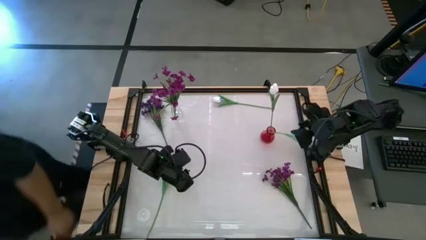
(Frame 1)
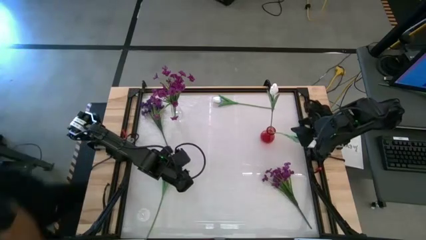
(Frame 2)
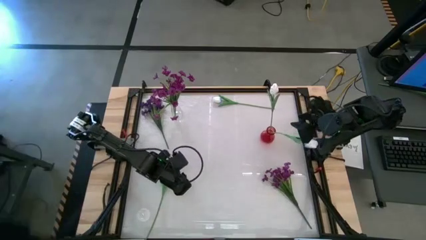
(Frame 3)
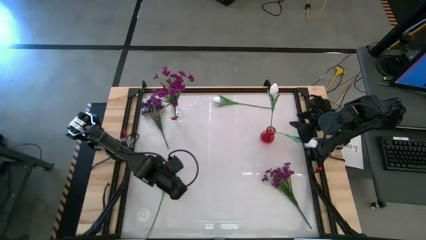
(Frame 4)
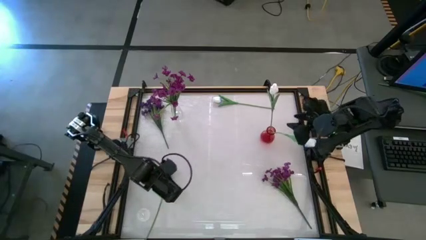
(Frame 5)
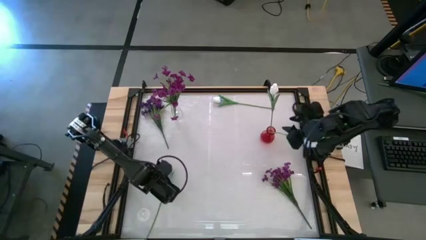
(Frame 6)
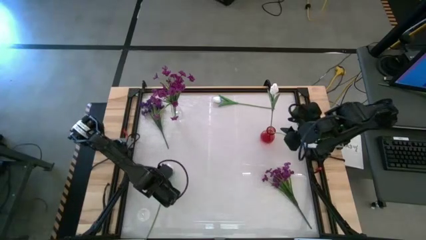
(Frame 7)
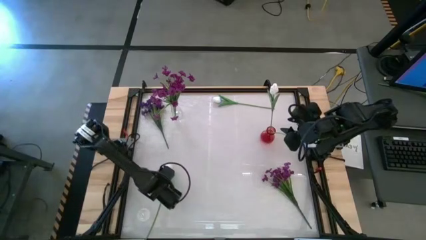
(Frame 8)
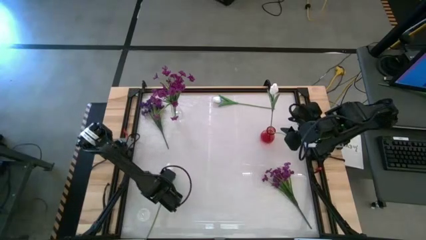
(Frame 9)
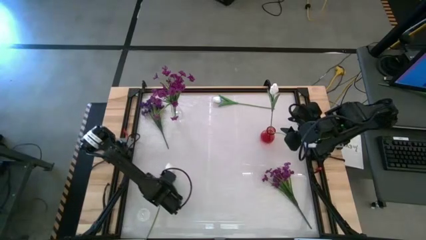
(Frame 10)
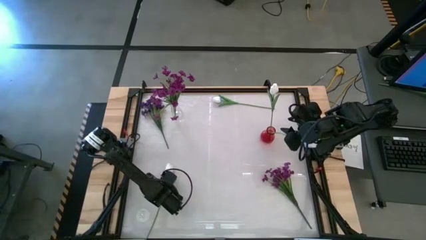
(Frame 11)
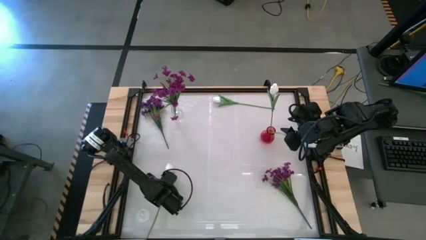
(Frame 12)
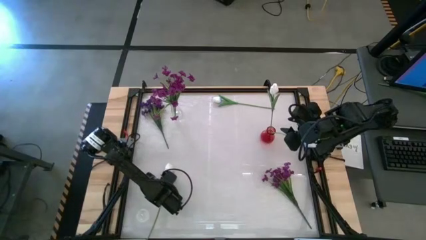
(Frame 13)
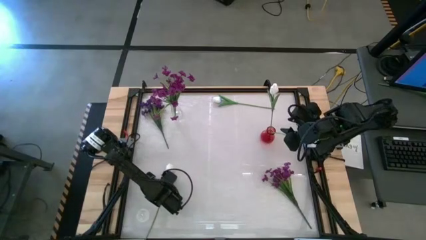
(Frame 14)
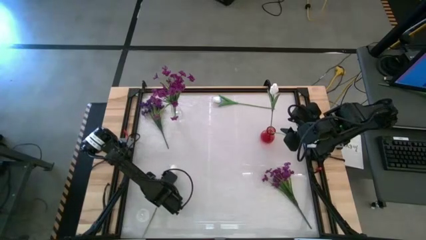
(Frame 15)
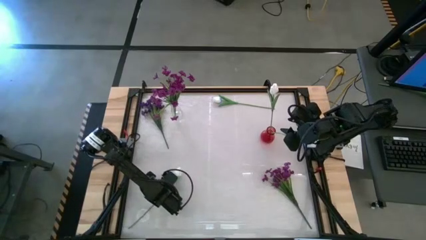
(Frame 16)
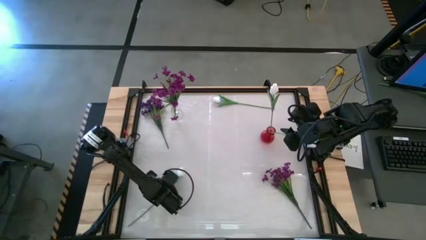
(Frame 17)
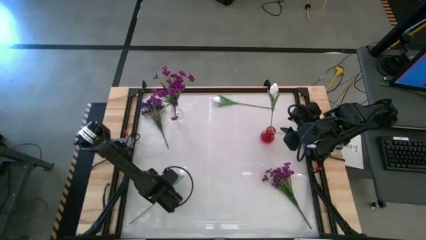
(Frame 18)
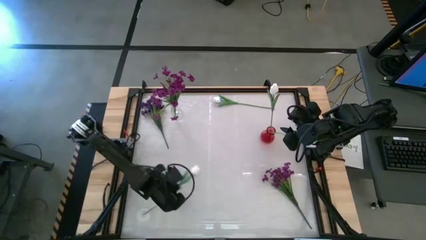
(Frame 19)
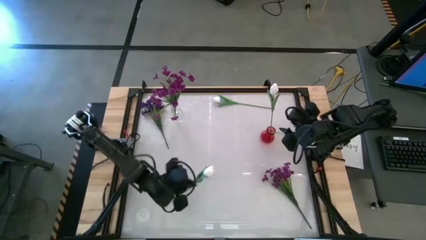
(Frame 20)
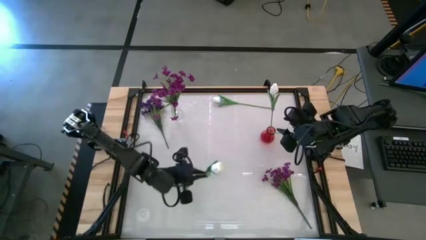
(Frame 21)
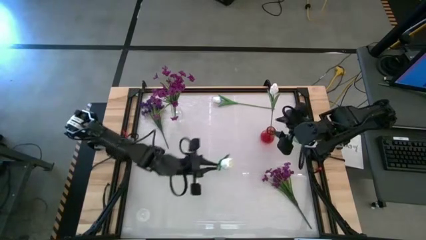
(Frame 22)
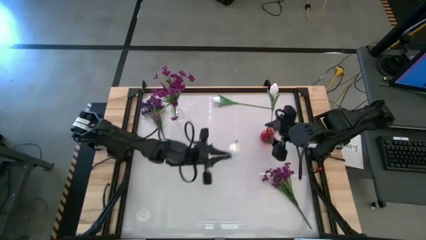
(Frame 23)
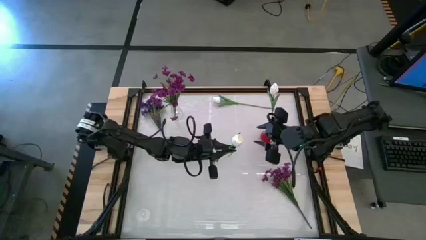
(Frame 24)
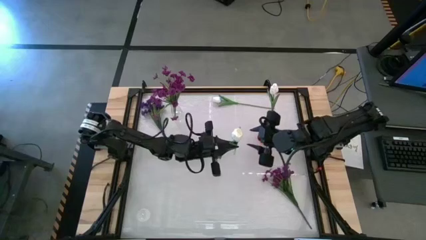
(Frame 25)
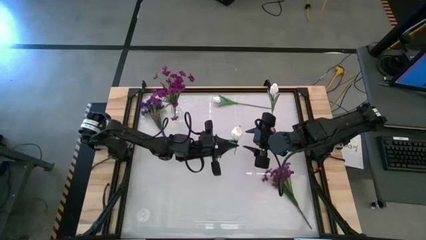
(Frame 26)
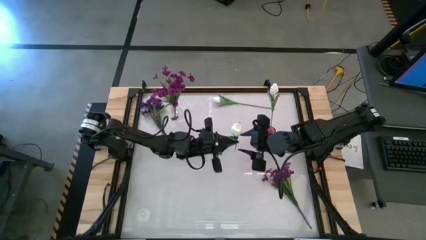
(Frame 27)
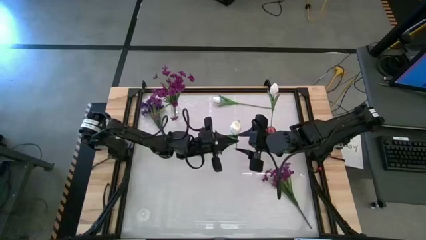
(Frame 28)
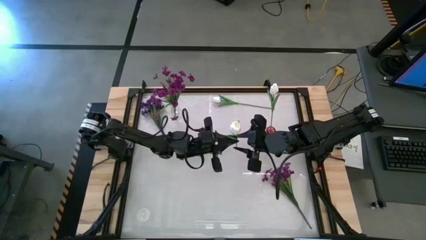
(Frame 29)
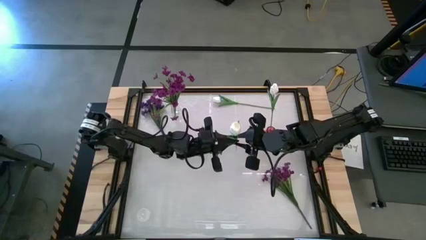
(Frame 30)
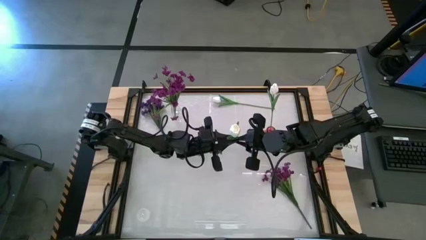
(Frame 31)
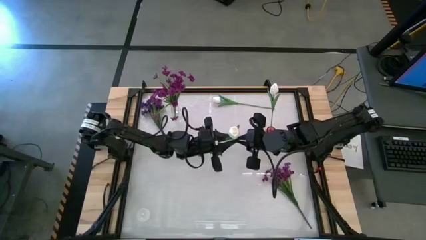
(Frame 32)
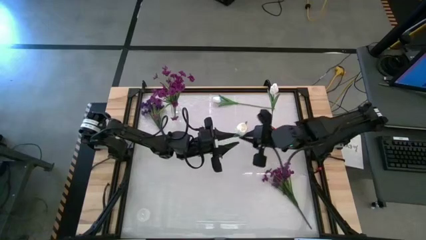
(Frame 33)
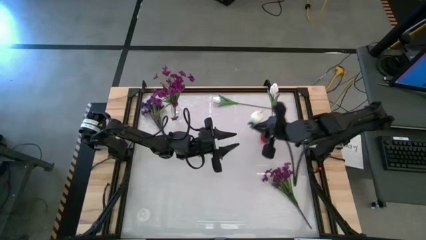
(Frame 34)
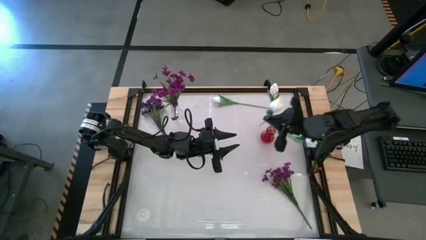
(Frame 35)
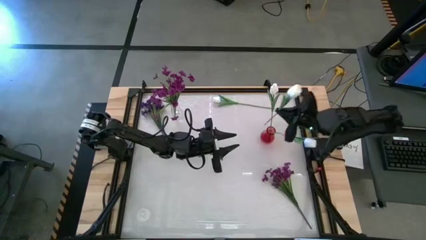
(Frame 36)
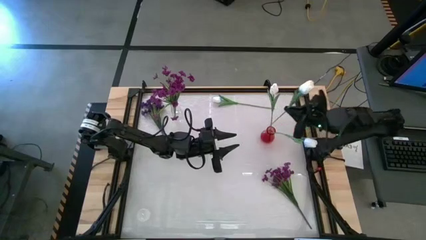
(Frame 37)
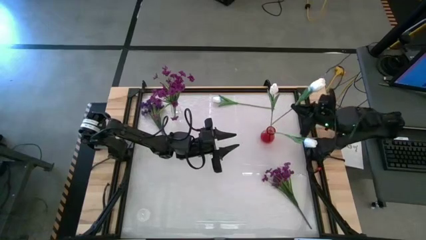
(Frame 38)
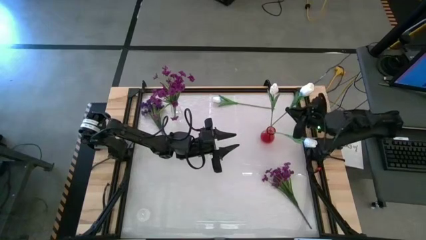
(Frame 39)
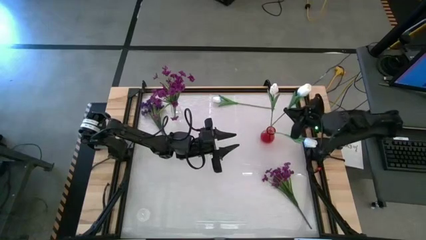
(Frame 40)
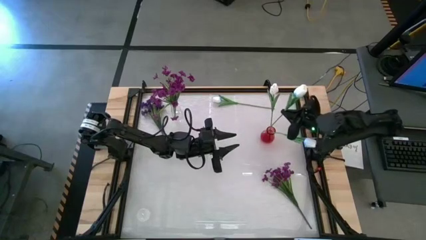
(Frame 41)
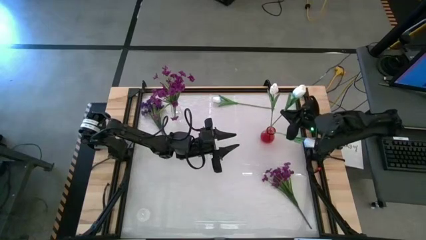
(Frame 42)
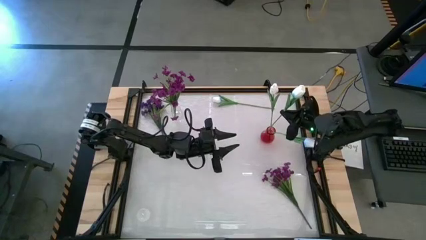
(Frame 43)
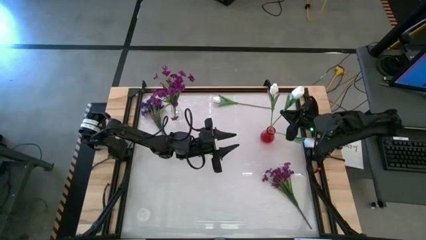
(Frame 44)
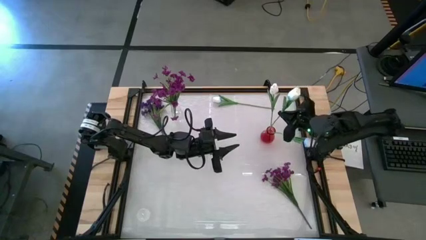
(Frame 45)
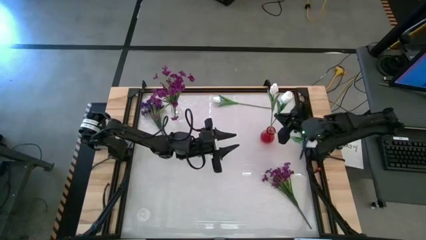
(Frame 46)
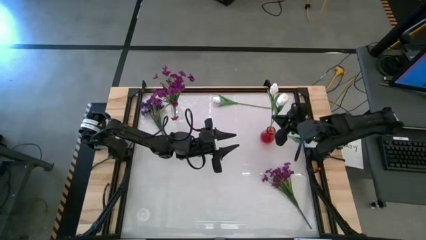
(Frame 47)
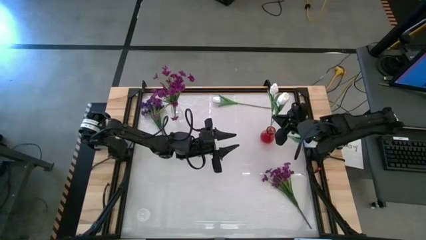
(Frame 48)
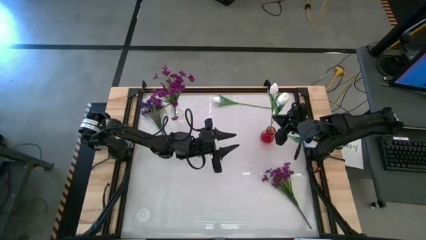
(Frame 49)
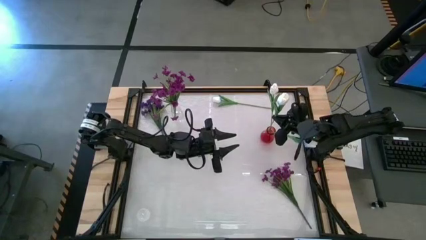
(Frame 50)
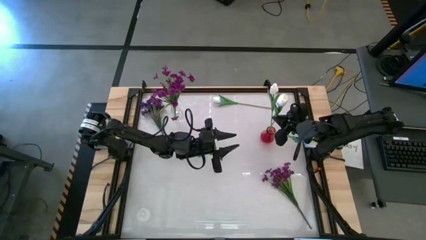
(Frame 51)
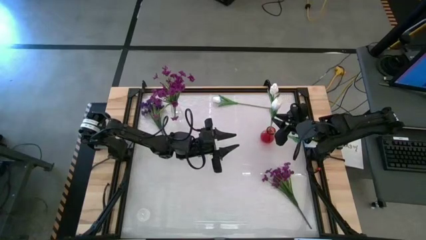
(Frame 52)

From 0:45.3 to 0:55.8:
Task: Sort flowers into vase by color
Put the bottom white tulip into the red vase

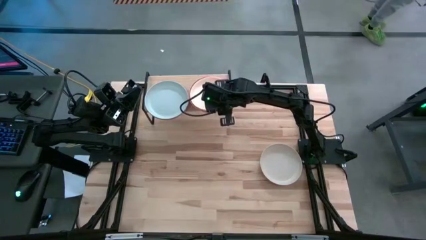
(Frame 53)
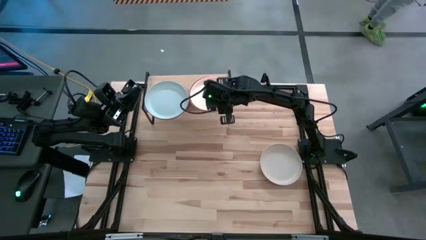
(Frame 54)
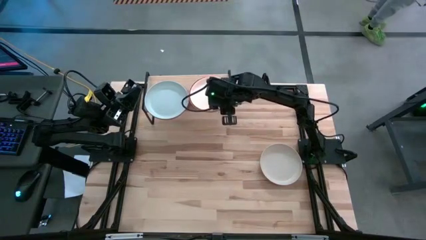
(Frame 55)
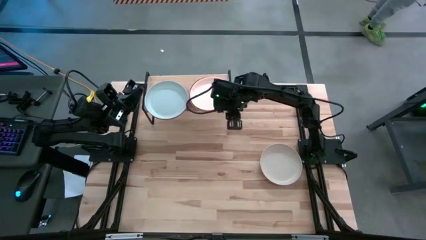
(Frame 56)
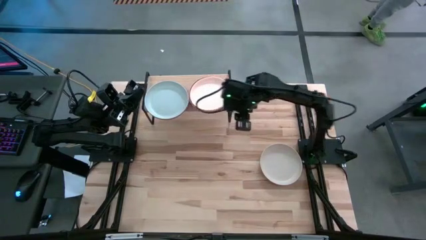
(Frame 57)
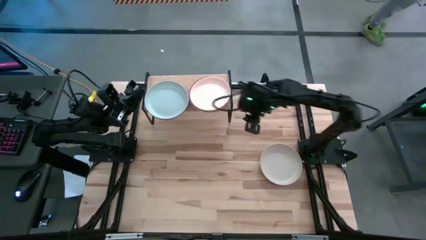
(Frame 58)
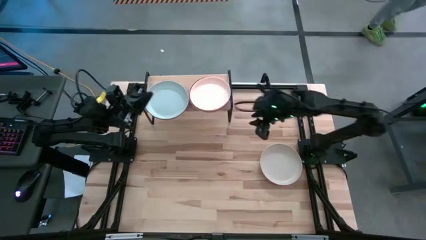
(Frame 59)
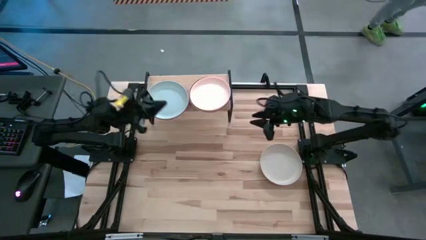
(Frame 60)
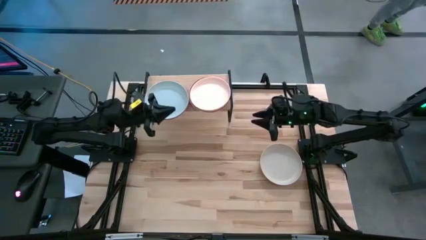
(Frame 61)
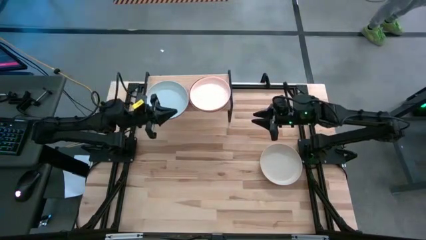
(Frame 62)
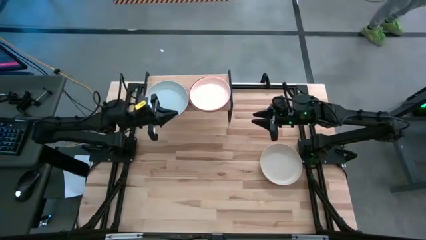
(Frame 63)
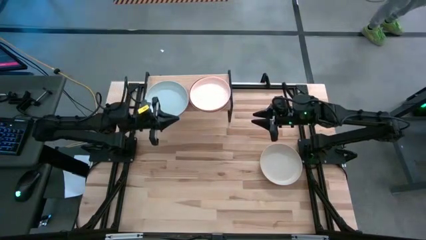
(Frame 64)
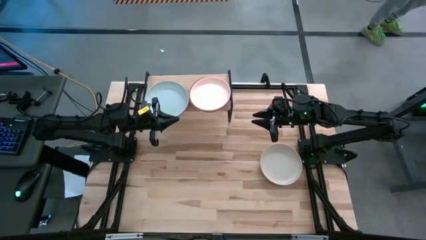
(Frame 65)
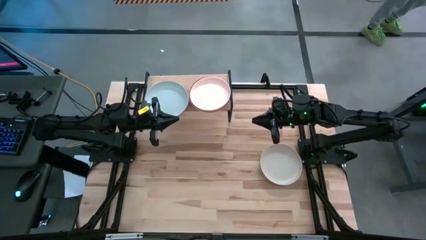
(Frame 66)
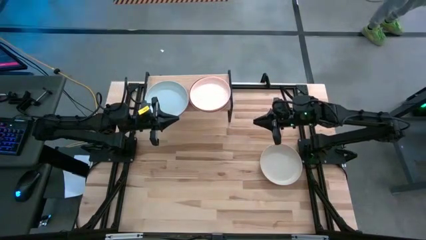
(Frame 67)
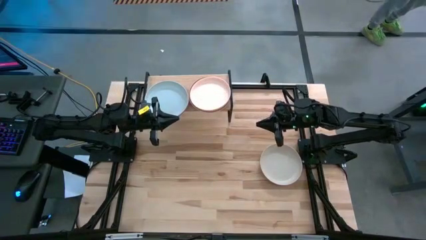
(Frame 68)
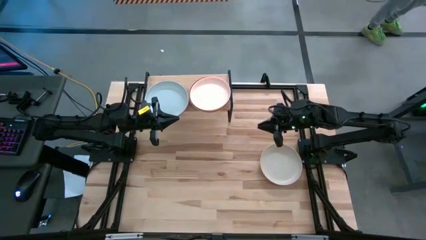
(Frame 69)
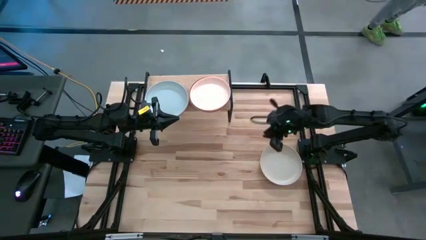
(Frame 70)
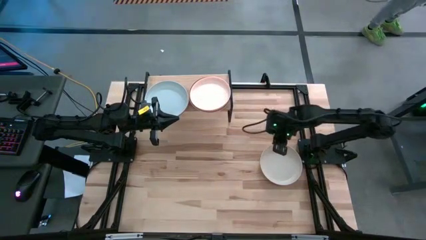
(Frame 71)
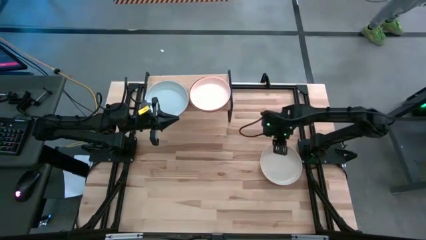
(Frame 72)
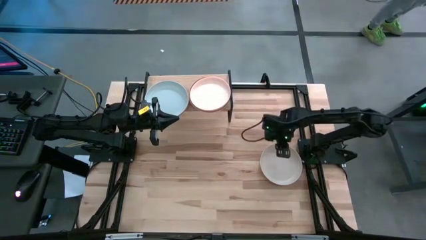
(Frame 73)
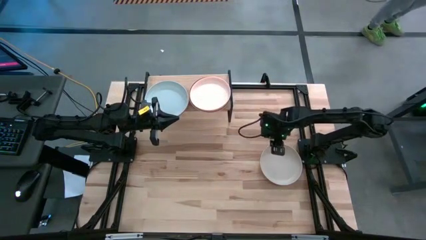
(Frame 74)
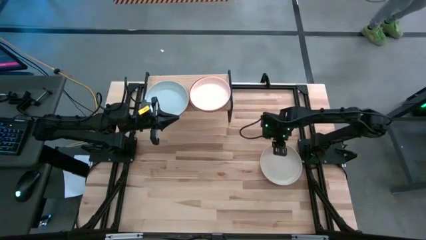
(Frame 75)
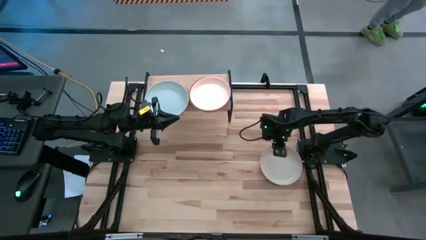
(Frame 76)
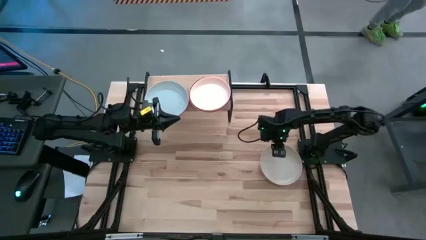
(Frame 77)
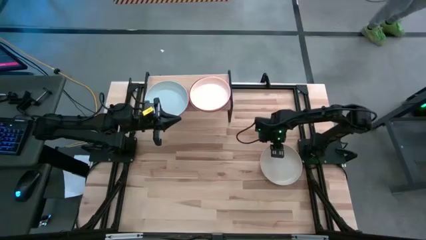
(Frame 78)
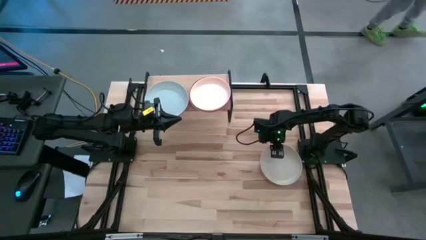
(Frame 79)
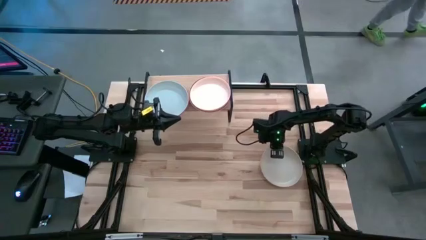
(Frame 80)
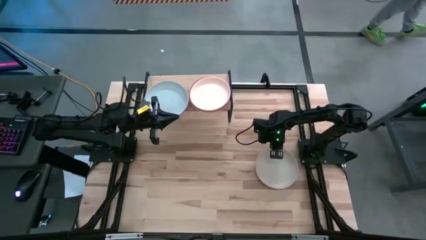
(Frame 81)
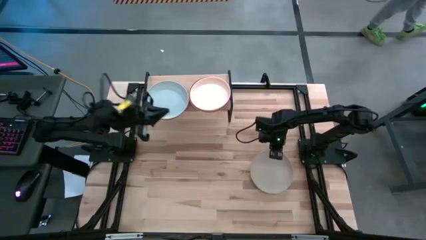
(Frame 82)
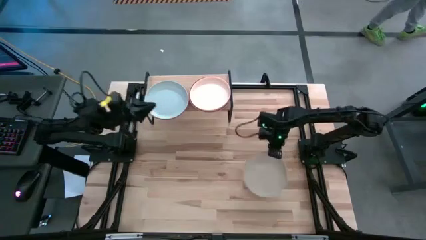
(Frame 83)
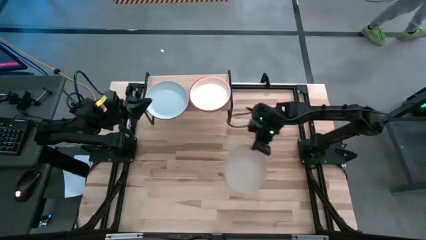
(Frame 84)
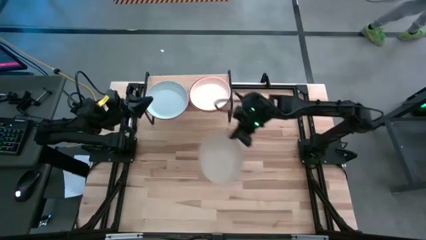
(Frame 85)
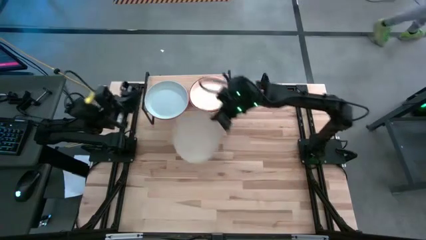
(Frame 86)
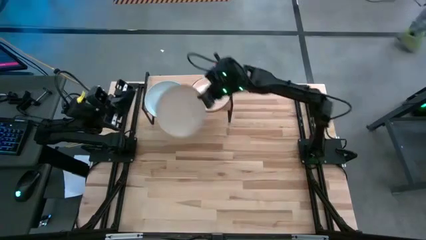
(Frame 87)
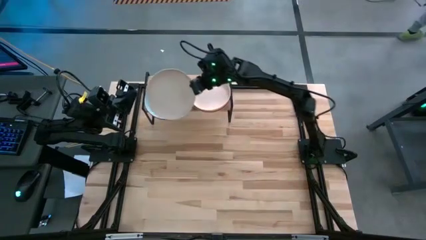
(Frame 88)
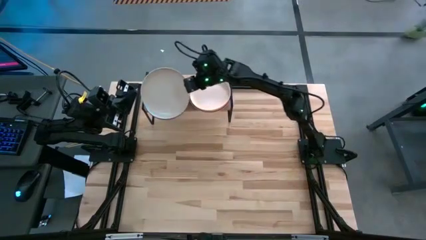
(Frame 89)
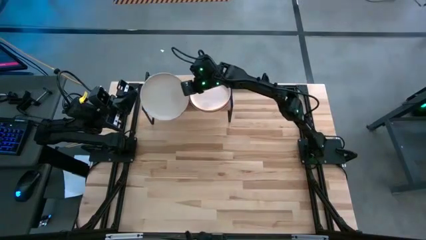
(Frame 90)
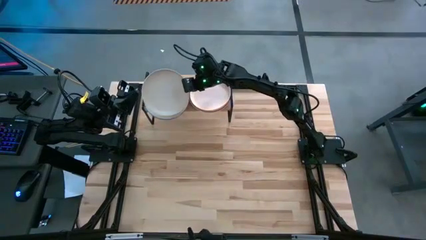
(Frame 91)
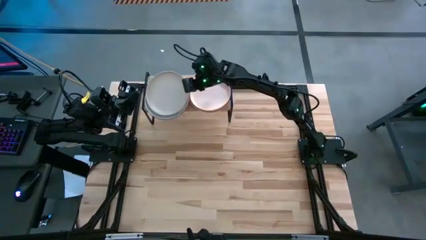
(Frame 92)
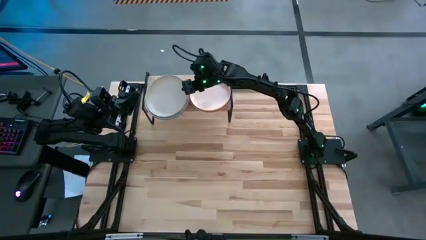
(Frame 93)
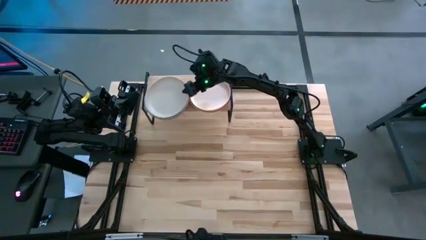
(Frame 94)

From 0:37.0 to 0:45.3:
Task: Place and stack plates onto a shelf
Stack the white plate on top of the light blue plate
